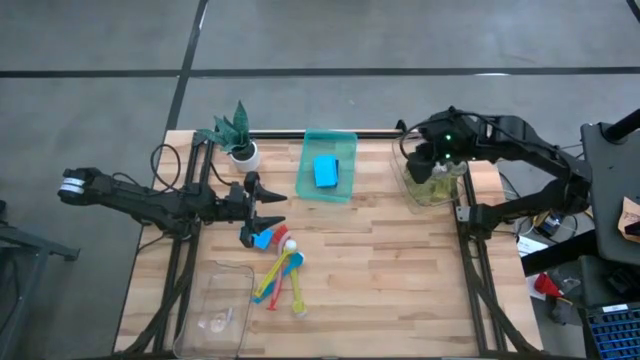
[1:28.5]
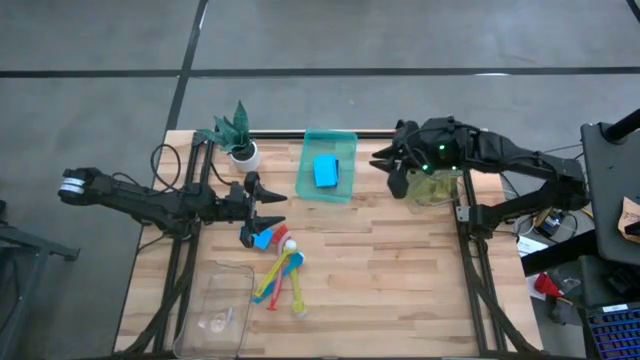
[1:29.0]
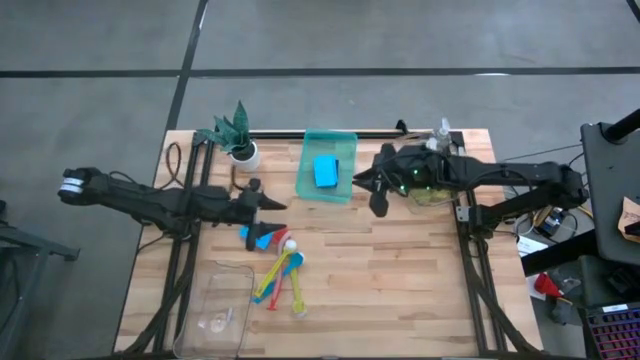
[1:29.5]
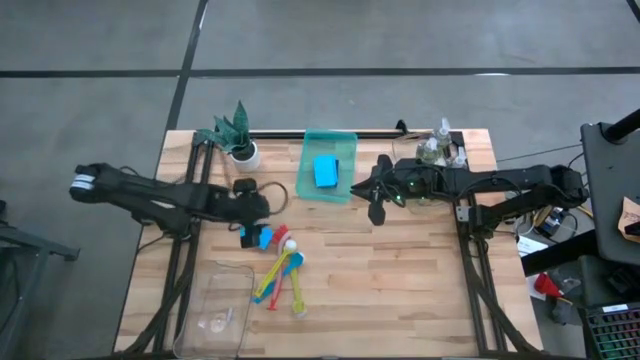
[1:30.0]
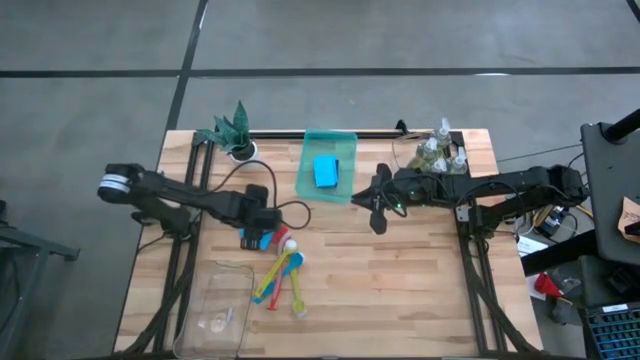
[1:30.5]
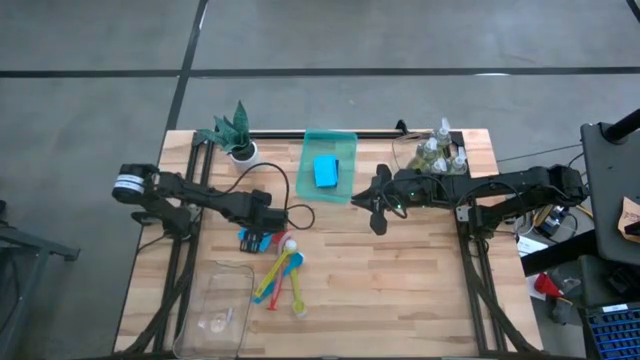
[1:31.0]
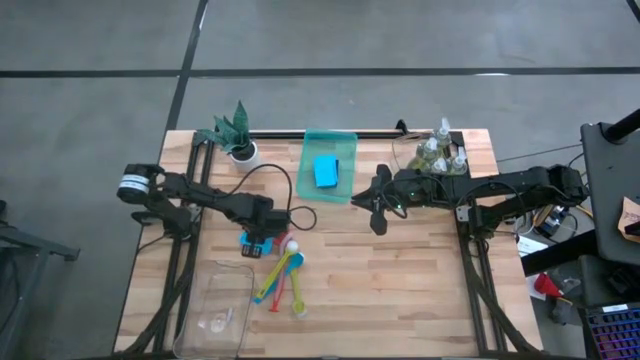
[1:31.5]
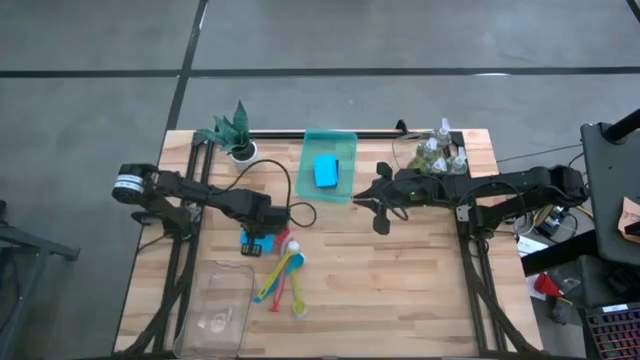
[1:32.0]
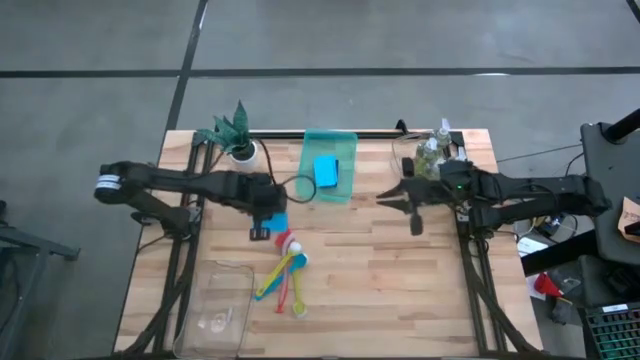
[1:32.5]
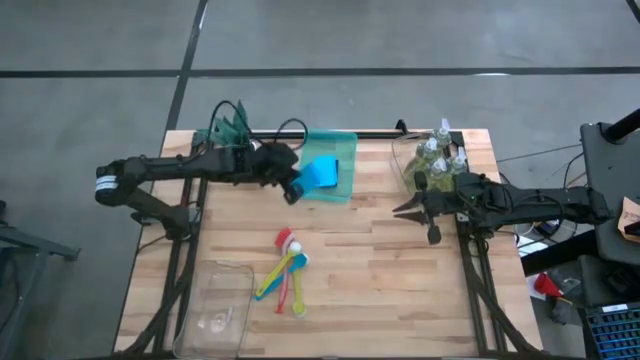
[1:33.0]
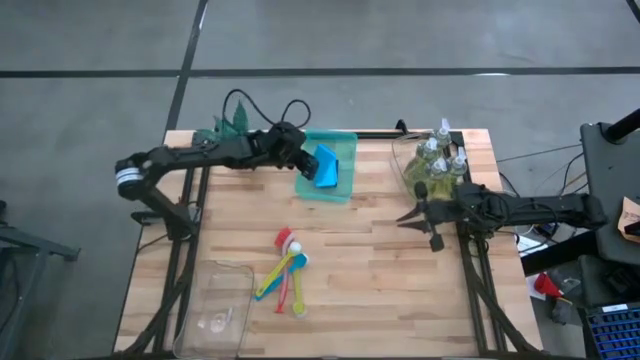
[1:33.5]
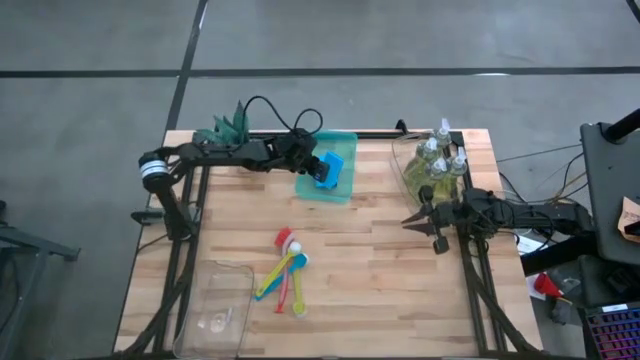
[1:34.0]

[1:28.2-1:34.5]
Task: Pick & Place Kitchen Sink Supplies
Put the blue sponge into the green bin

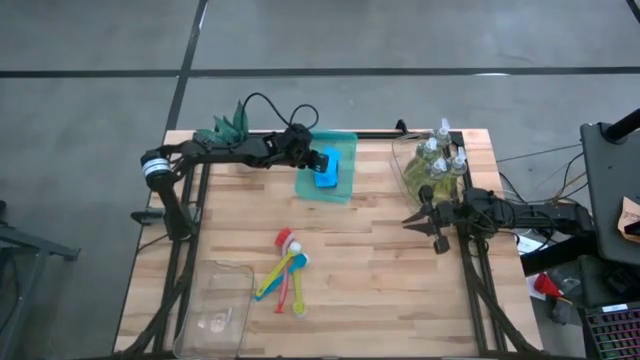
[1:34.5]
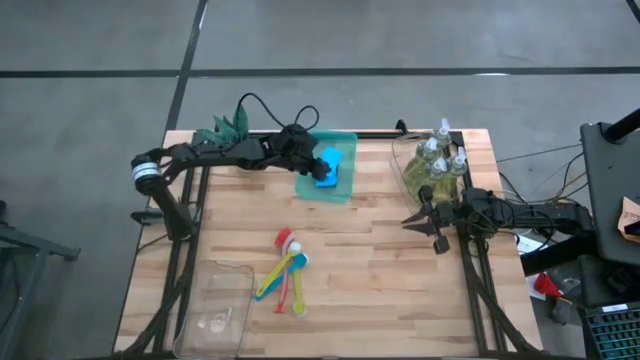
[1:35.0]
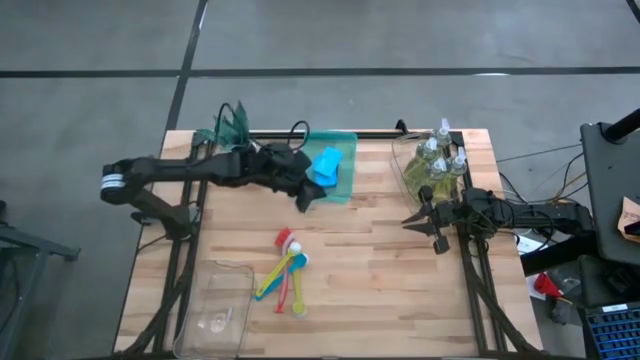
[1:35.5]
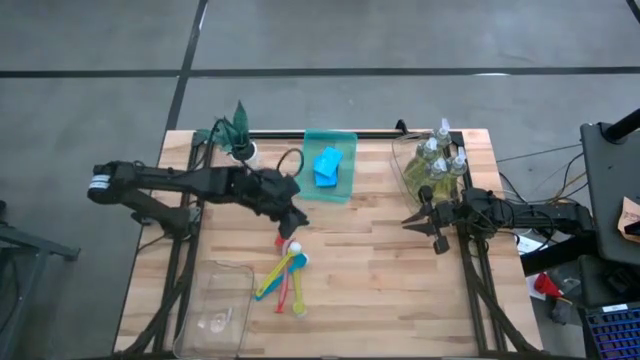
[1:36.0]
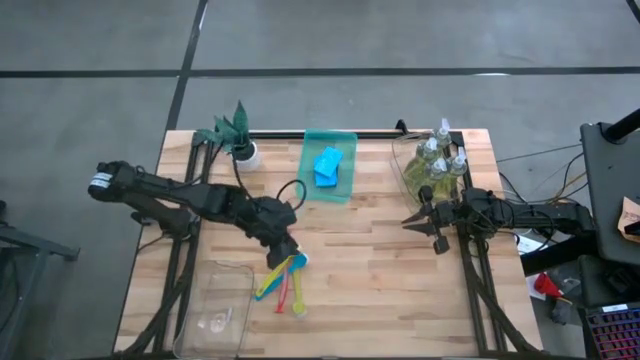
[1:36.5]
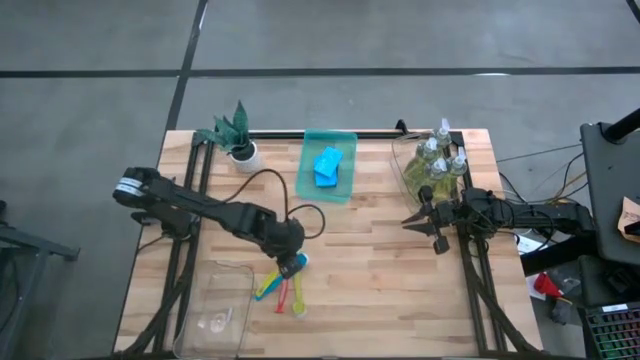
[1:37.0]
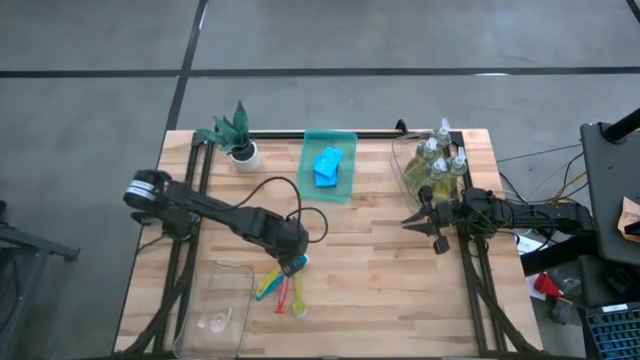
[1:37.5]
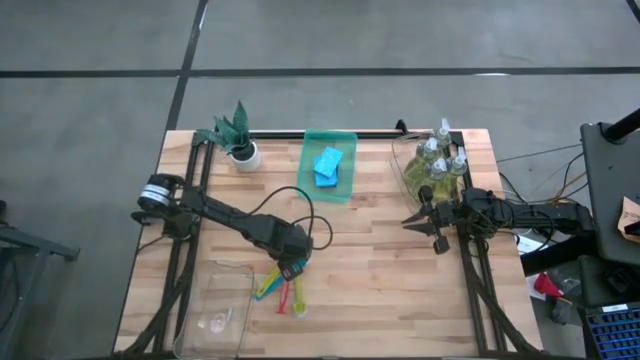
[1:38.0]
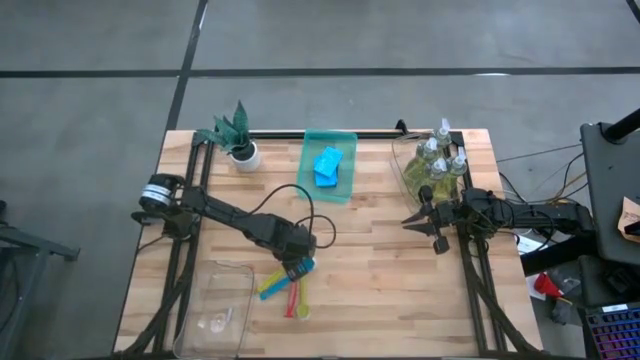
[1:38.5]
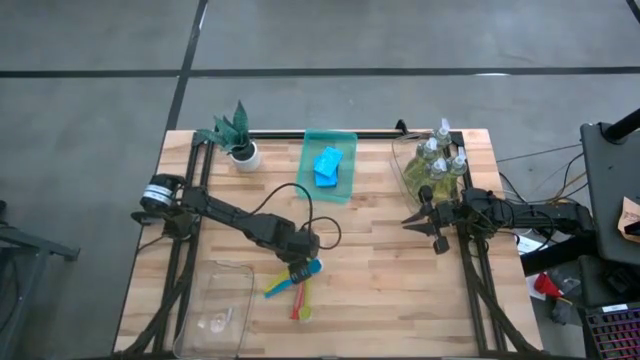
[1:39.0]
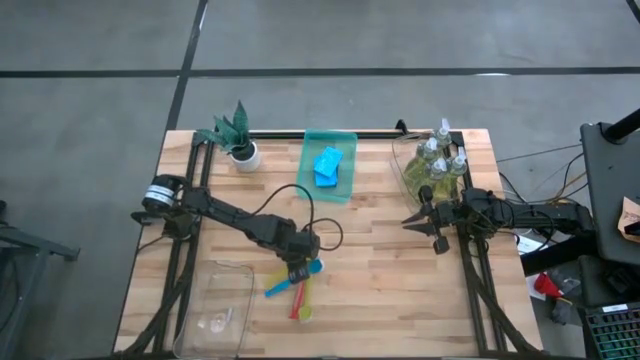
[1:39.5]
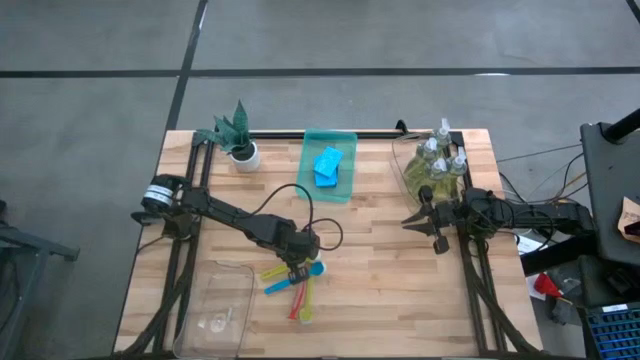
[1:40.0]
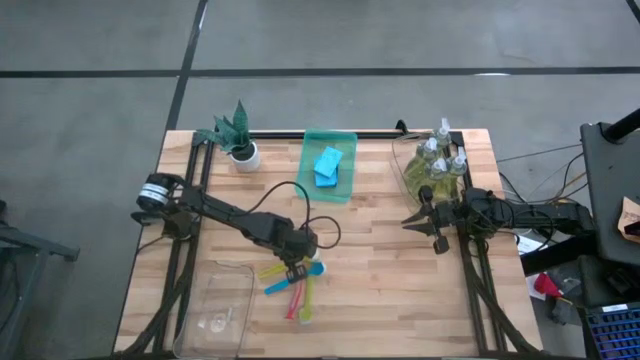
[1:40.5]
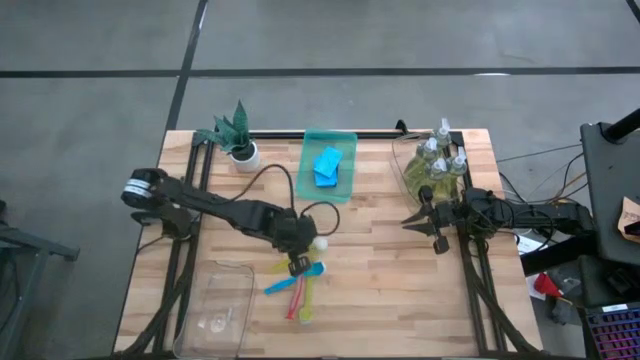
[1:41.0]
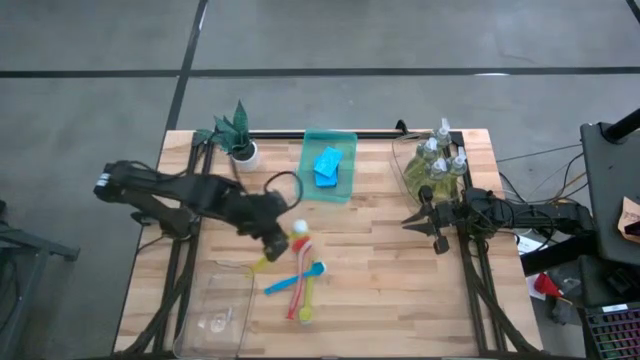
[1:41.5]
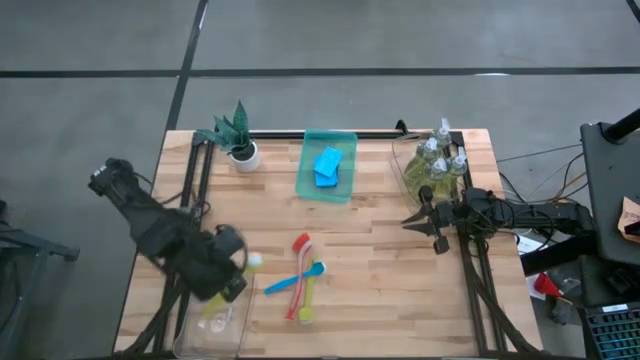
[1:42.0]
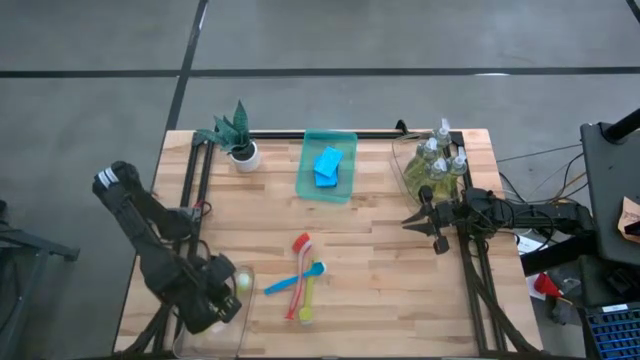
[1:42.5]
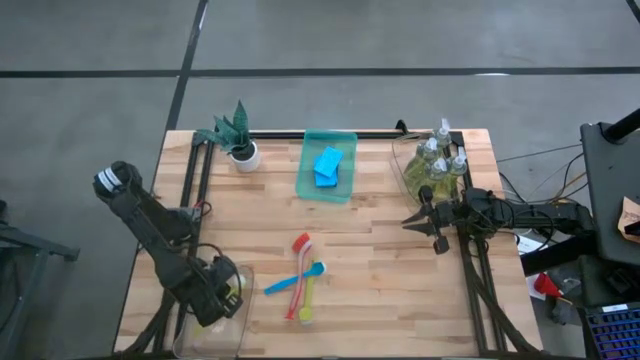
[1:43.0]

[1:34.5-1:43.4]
Put the yellow dish brush into the bottom transparent bin

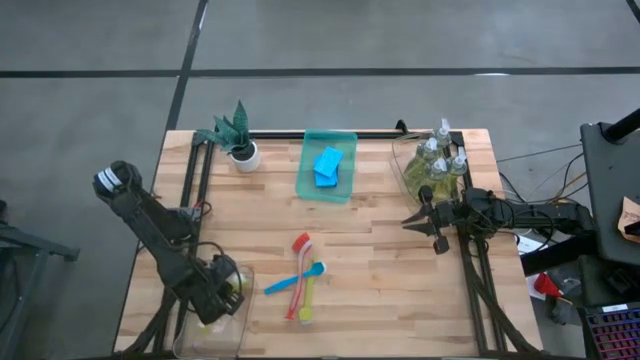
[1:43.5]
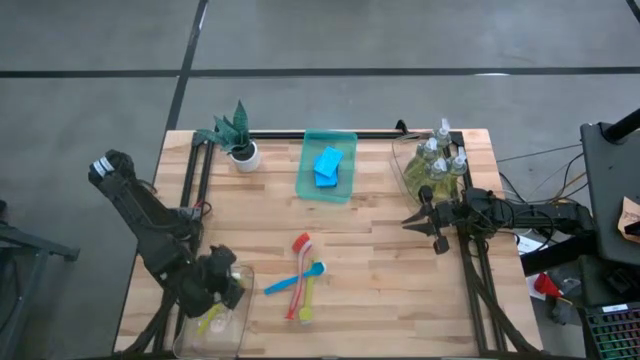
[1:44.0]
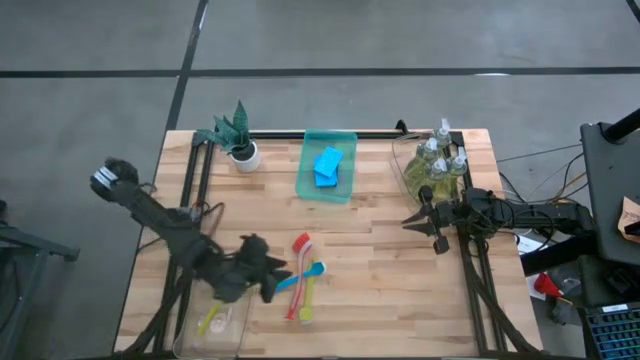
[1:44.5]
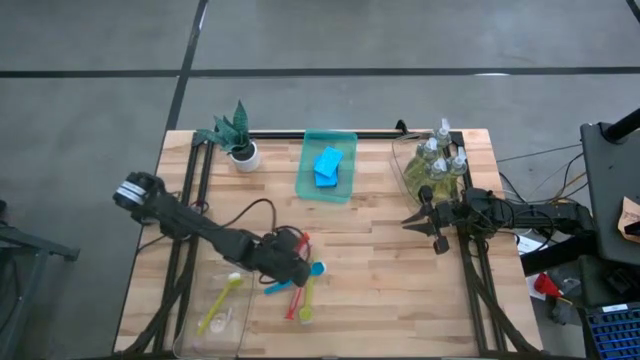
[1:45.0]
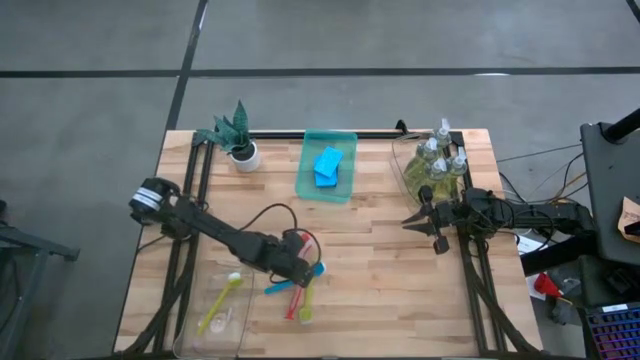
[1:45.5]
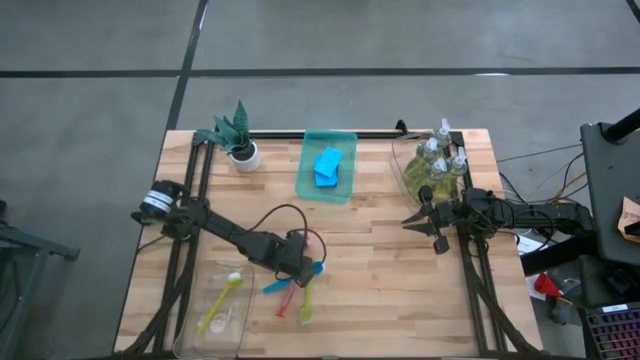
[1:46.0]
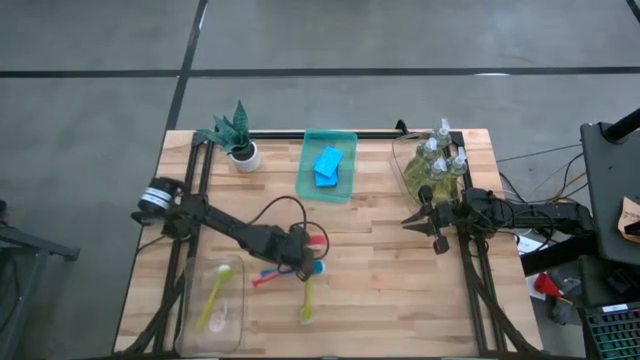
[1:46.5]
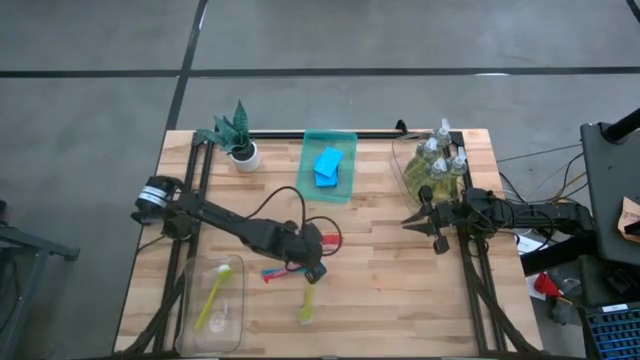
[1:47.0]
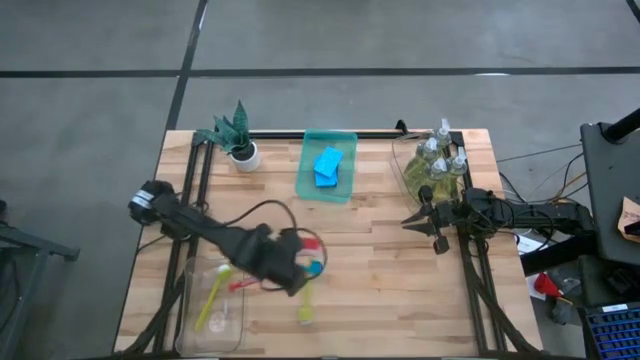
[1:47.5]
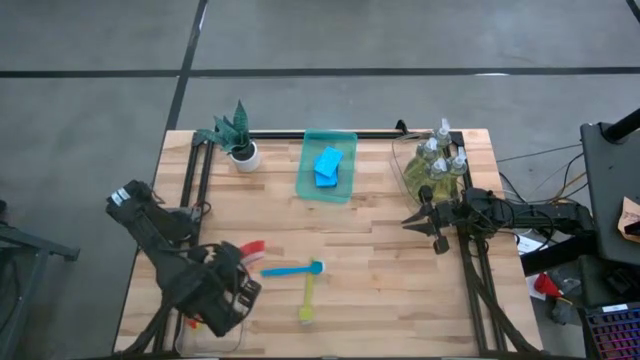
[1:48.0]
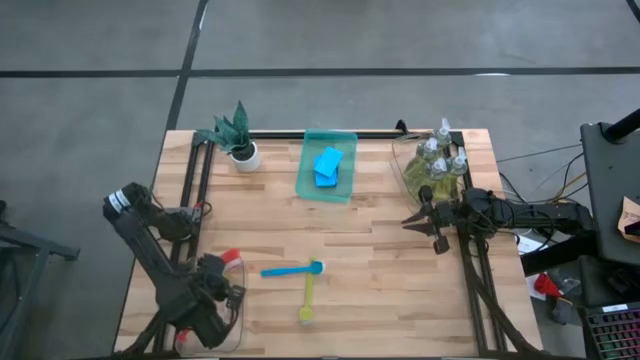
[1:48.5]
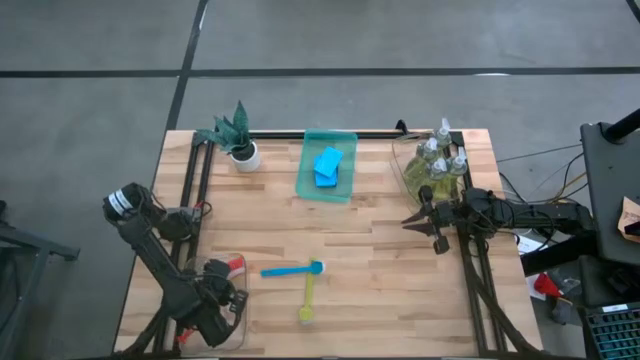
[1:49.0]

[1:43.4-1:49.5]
Put the red dish brush into the bottom transparent bin
